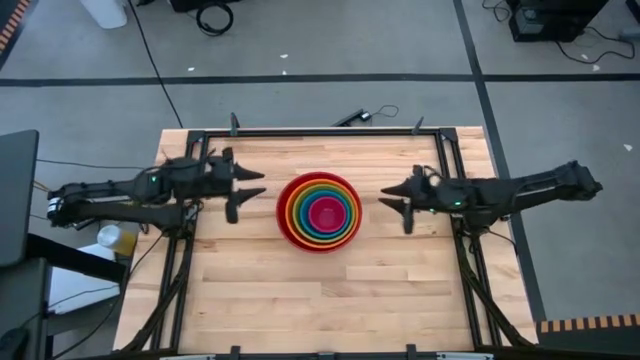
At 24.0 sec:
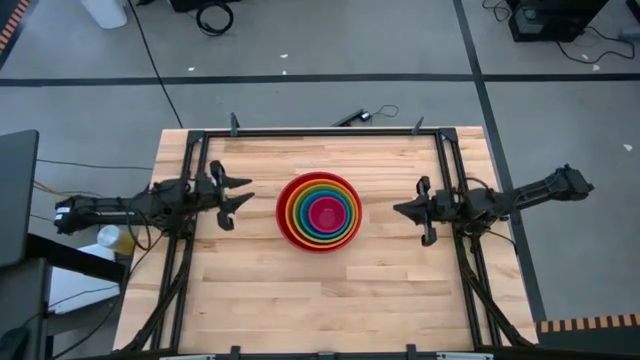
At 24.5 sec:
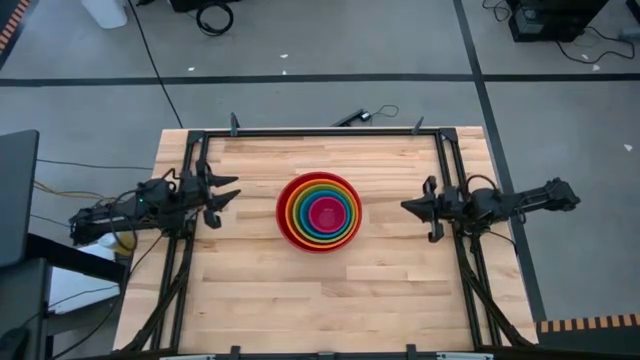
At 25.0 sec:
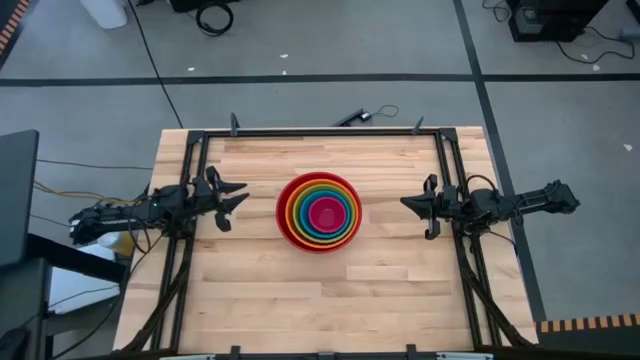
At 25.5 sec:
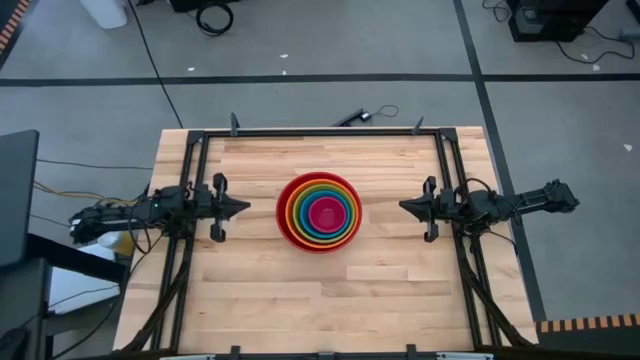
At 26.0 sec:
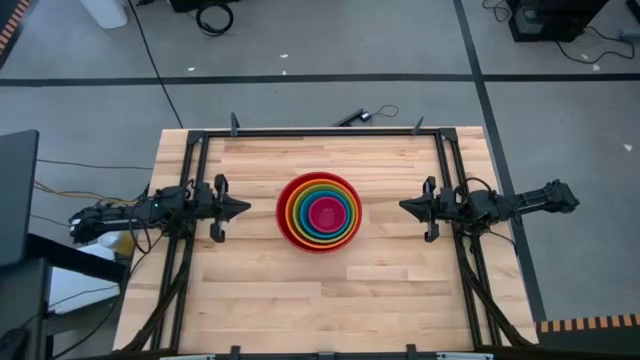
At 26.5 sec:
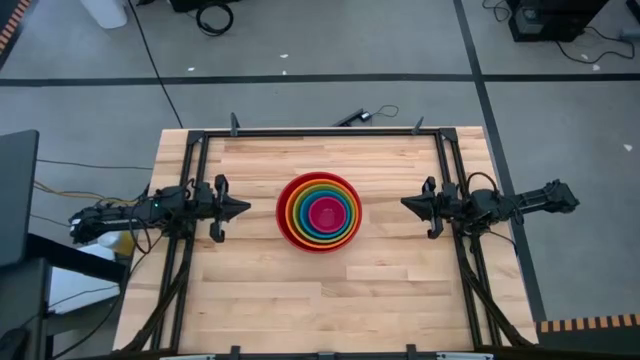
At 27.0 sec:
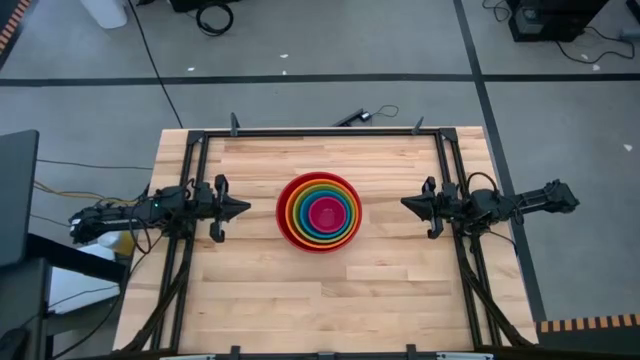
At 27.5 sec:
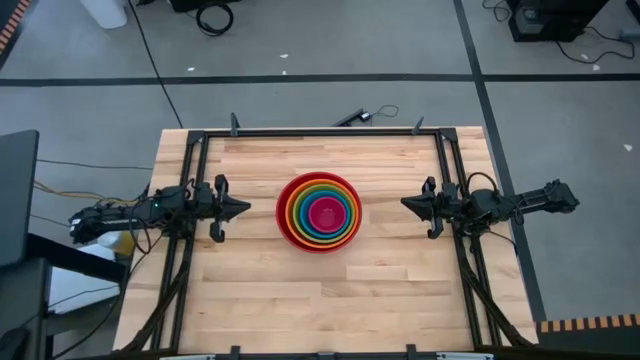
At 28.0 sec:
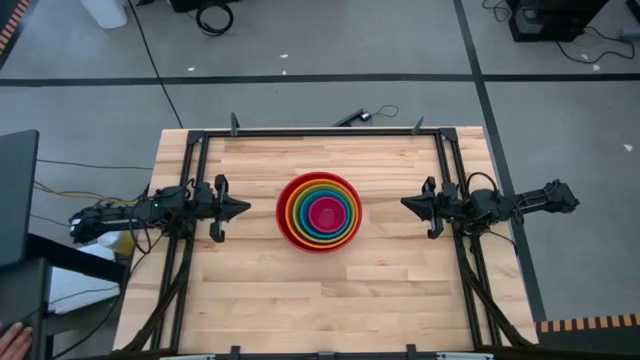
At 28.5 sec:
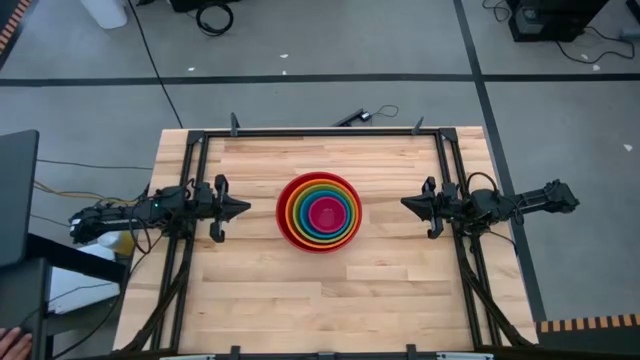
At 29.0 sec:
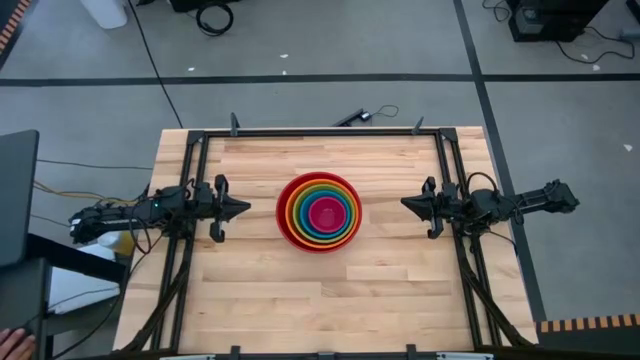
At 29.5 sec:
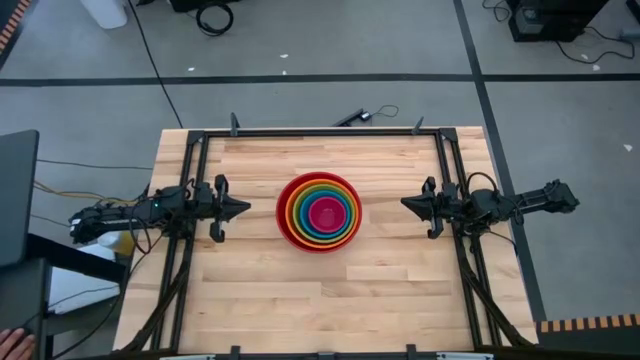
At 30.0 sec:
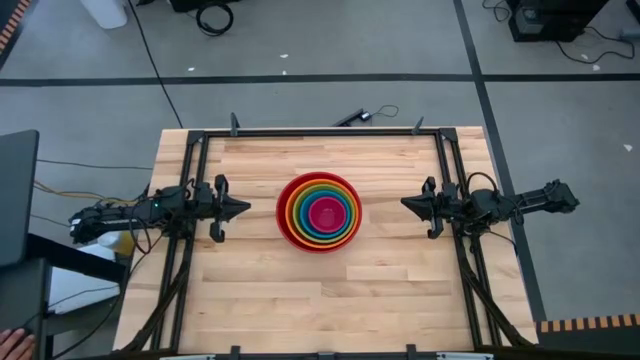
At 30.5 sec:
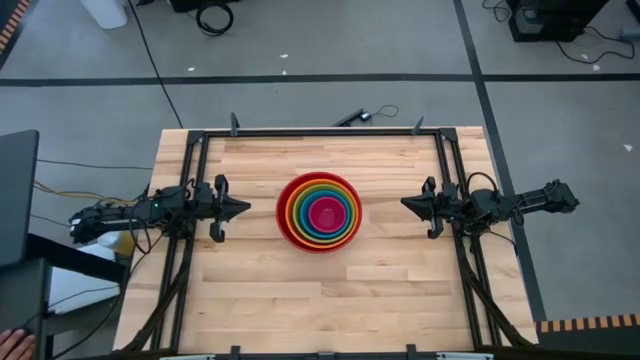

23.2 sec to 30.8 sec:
Return to Home Position

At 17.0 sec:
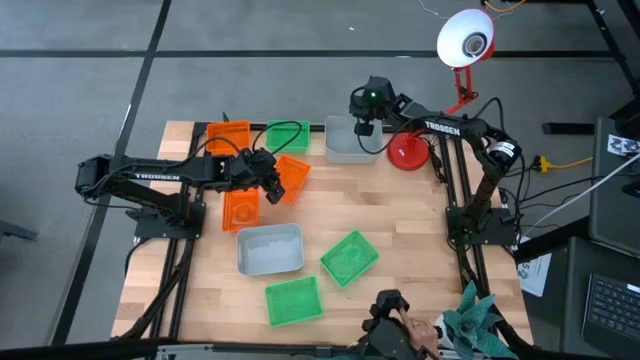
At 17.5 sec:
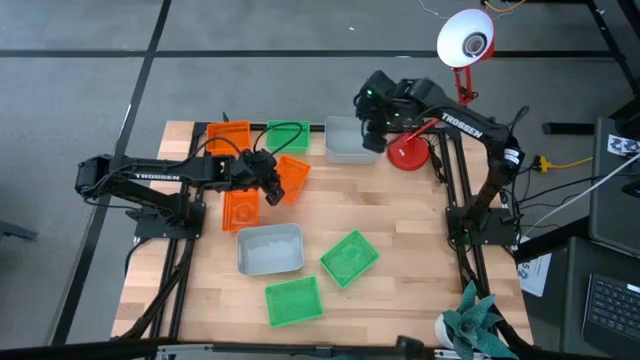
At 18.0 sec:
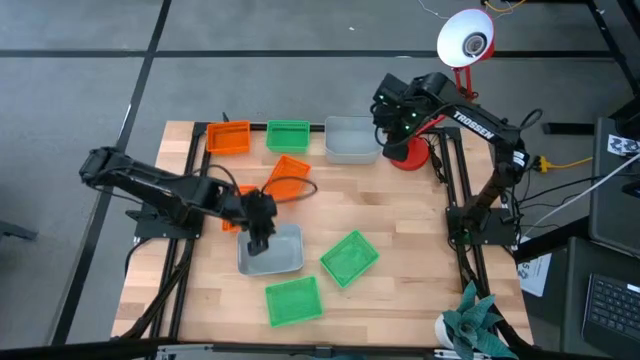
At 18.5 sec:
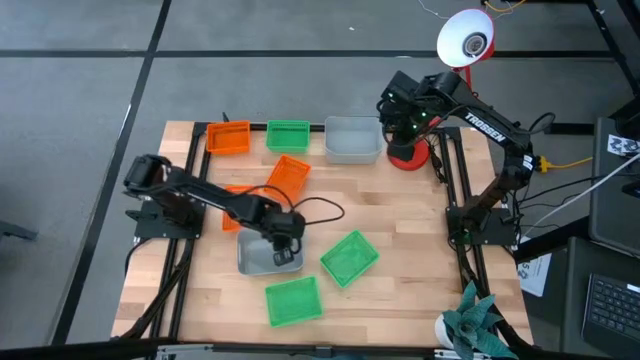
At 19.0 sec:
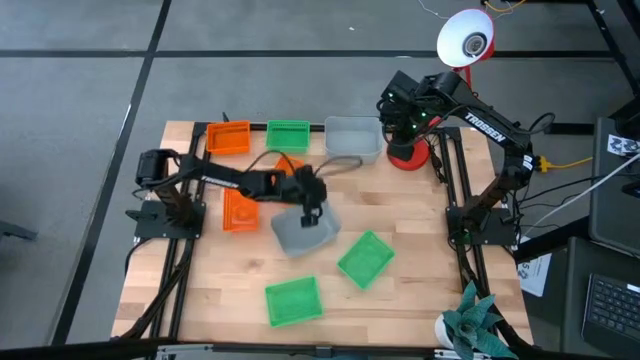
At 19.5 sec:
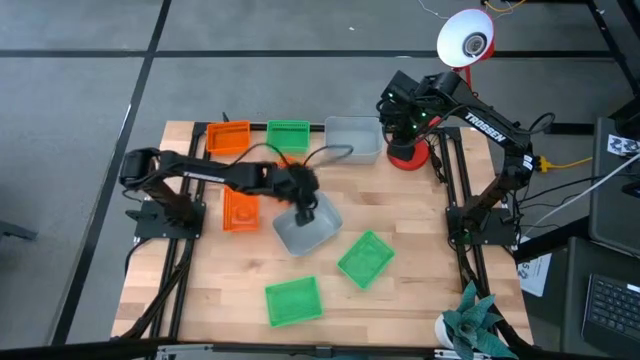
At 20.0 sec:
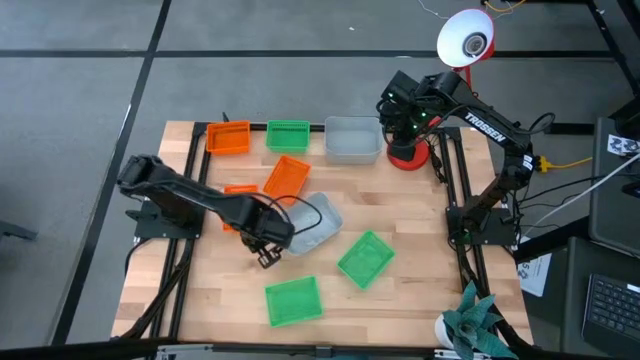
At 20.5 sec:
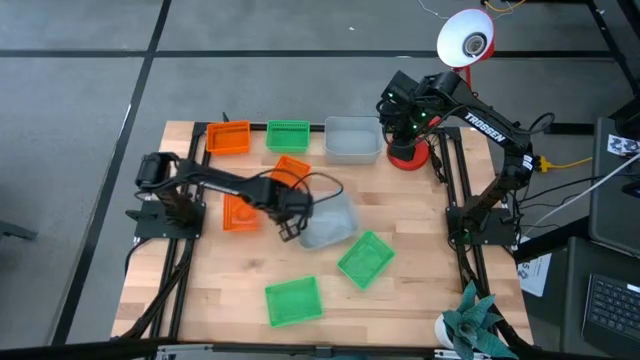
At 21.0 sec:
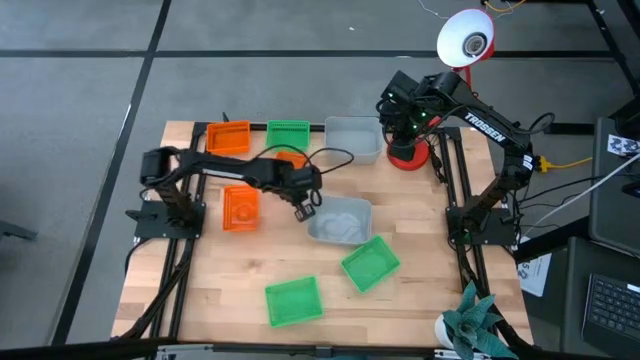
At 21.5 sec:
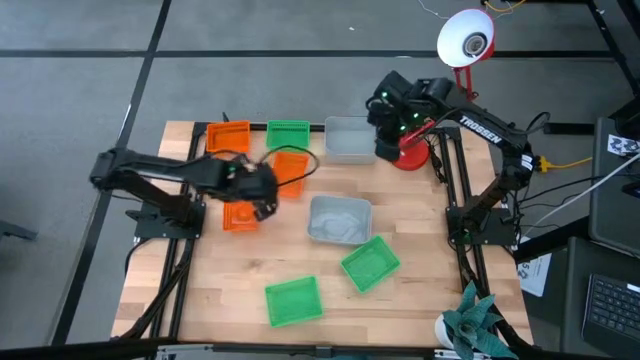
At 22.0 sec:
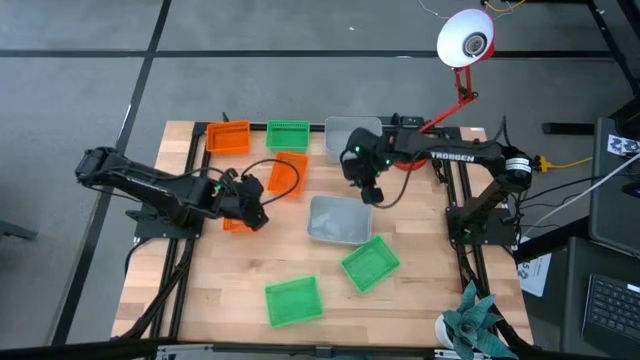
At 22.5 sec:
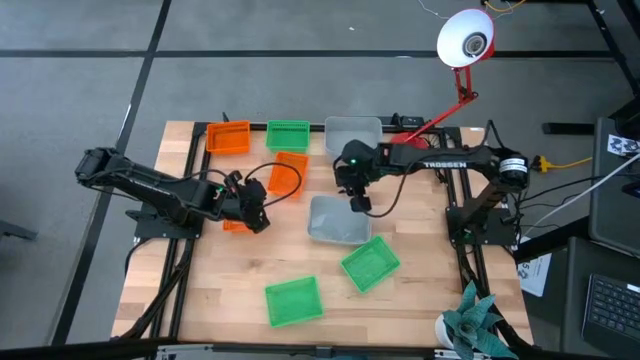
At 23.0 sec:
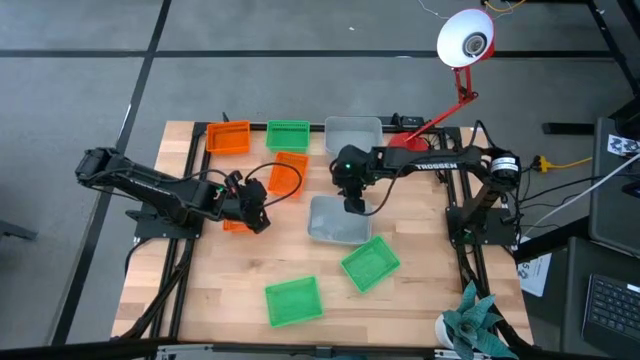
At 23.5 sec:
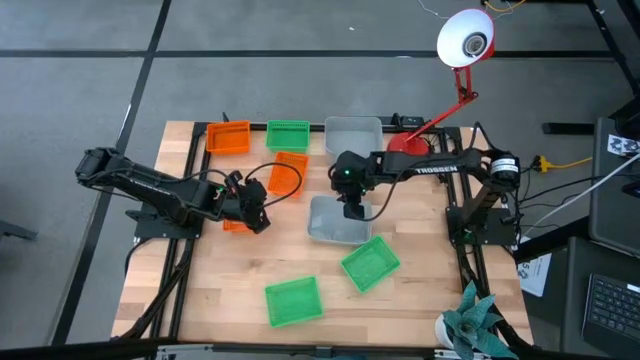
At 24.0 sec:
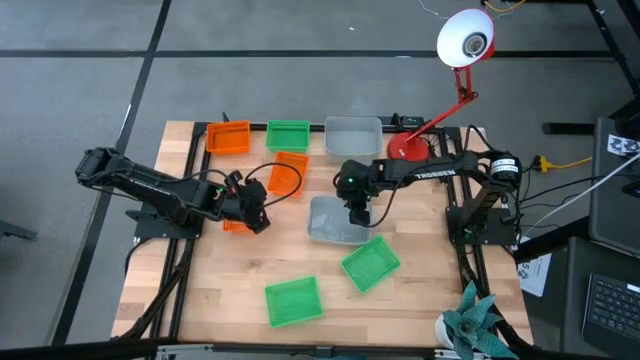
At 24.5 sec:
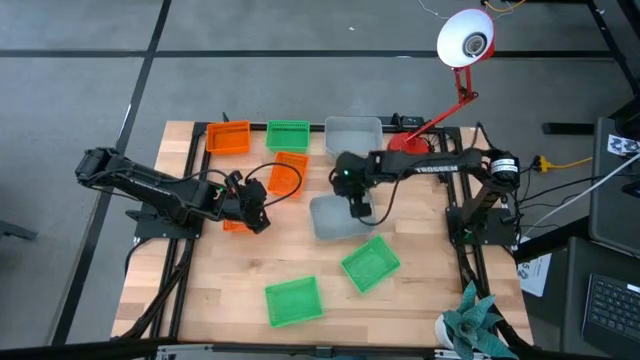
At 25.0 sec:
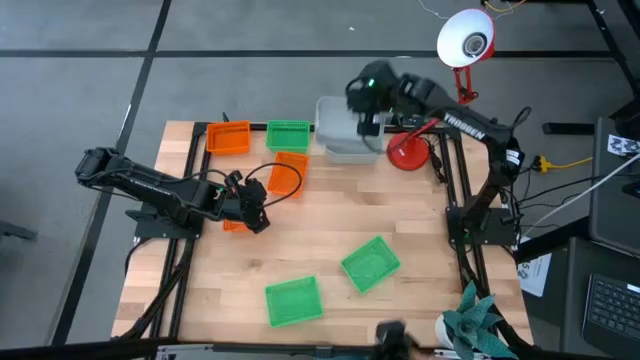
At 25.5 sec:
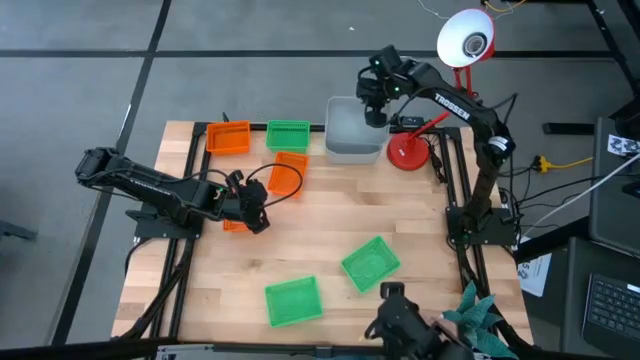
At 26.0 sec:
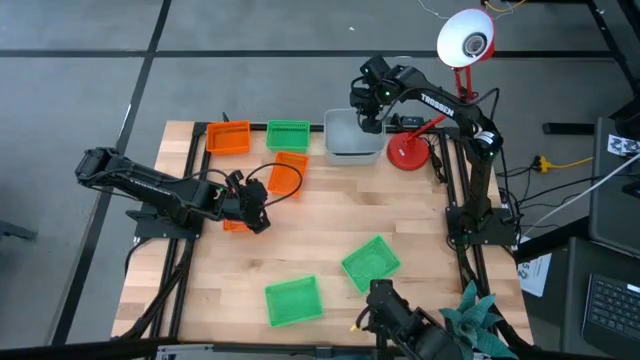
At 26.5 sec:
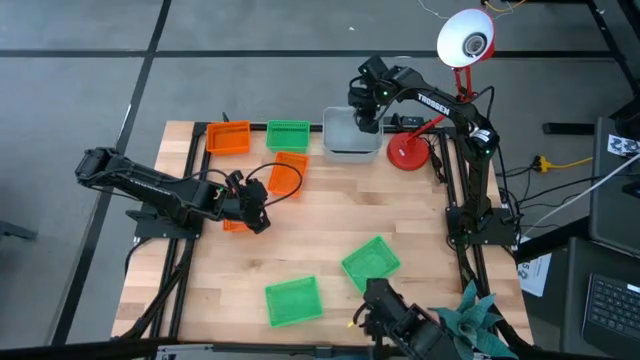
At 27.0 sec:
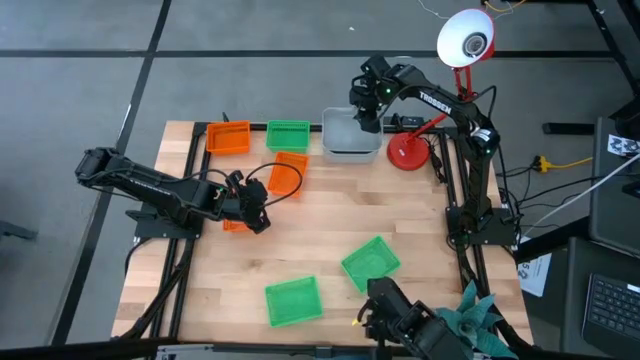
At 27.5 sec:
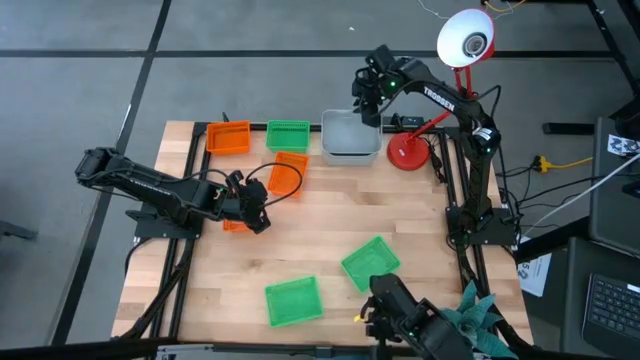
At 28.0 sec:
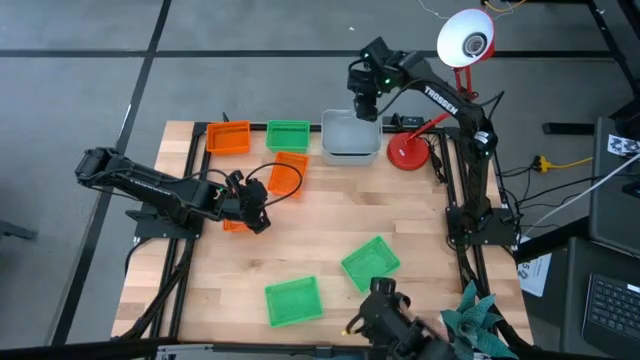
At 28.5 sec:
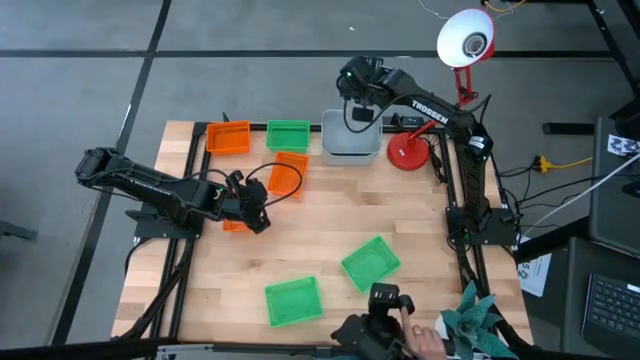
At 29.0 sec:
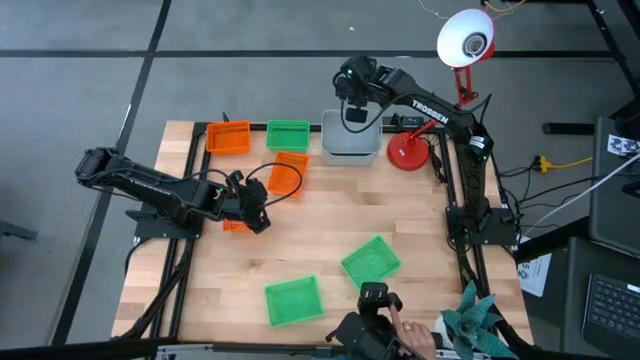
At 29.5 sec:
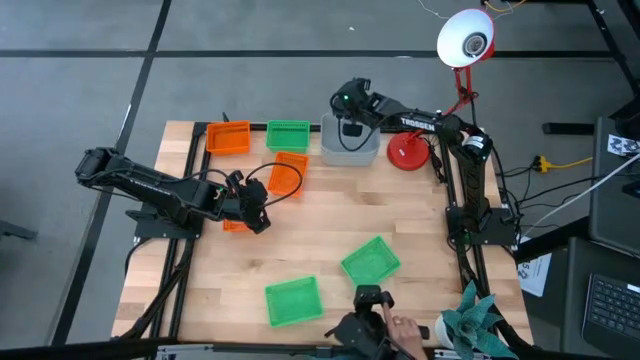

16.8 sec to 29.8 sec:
Stack the bottom gray bin on top of the top gray bins
